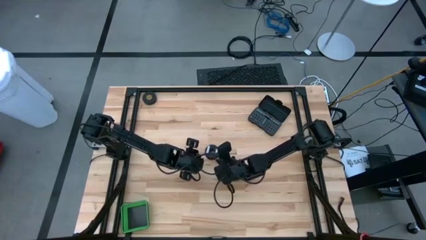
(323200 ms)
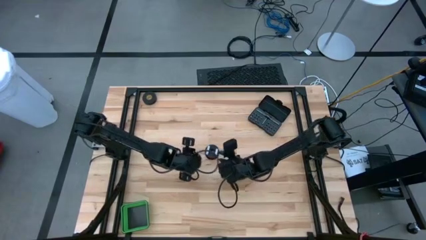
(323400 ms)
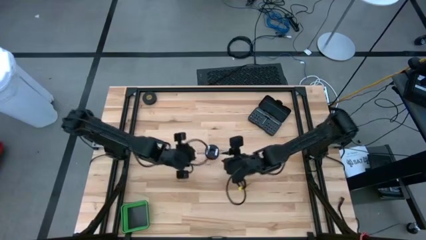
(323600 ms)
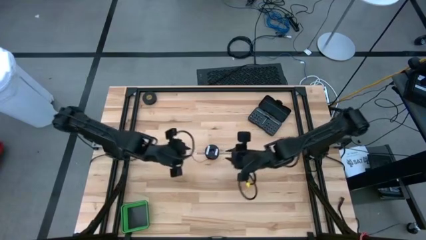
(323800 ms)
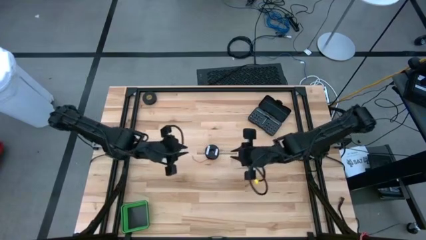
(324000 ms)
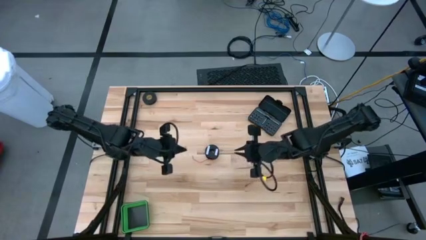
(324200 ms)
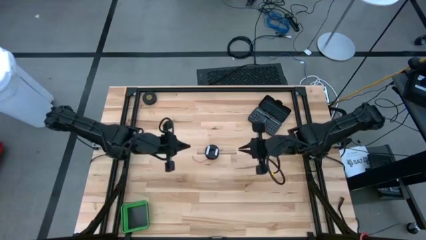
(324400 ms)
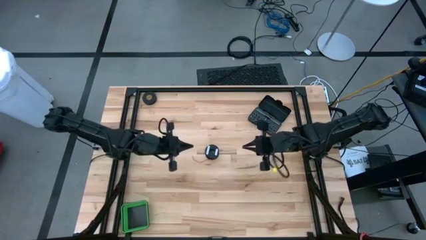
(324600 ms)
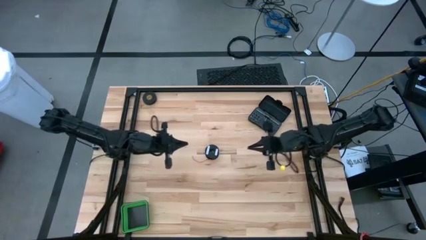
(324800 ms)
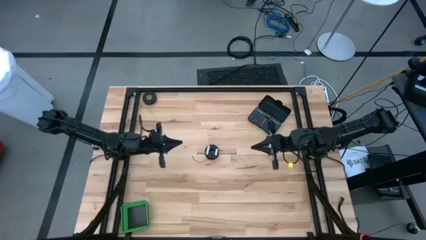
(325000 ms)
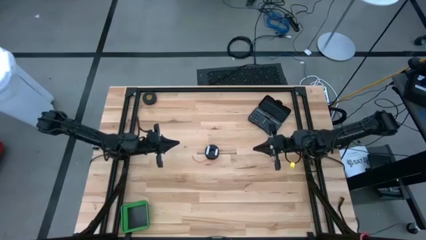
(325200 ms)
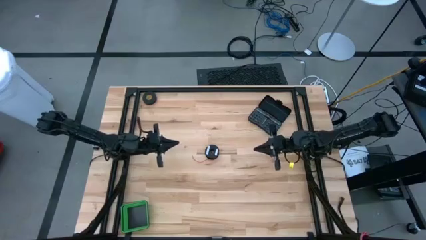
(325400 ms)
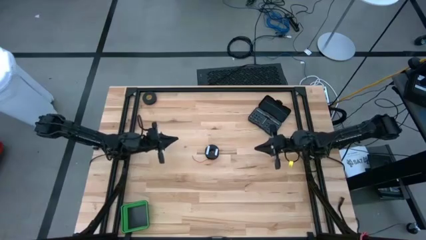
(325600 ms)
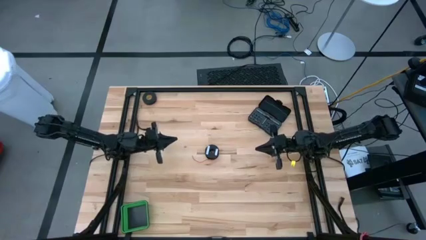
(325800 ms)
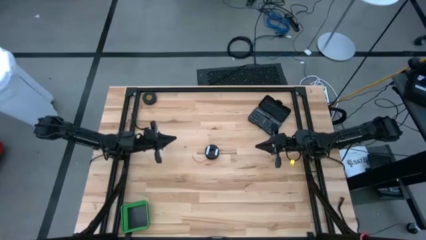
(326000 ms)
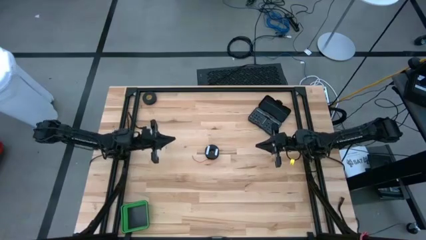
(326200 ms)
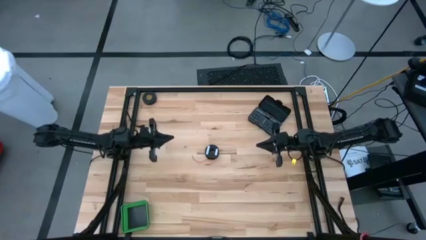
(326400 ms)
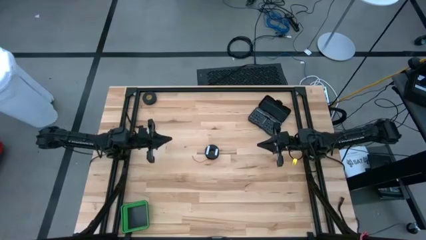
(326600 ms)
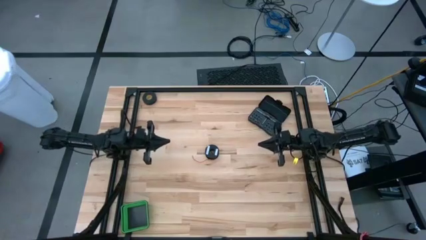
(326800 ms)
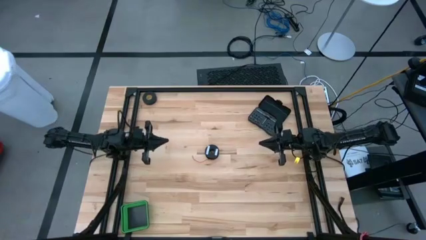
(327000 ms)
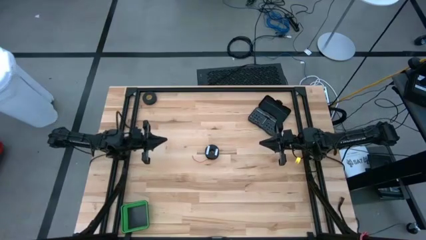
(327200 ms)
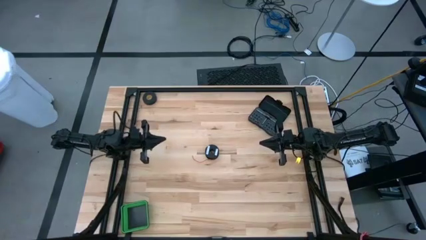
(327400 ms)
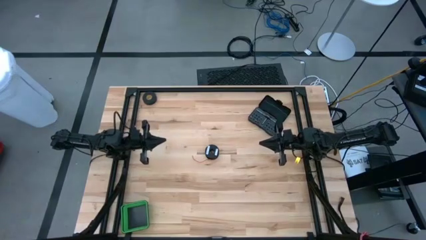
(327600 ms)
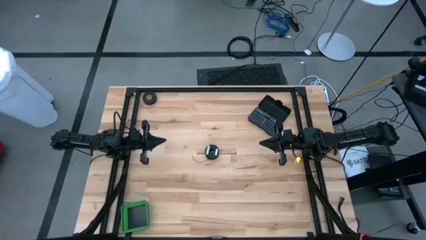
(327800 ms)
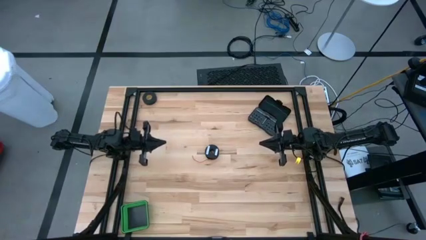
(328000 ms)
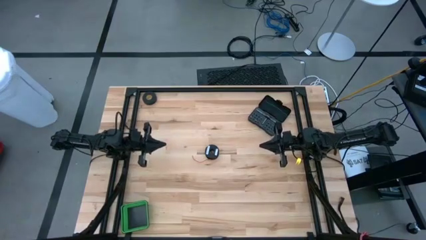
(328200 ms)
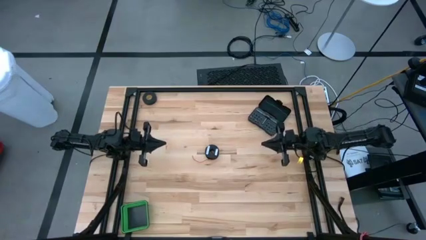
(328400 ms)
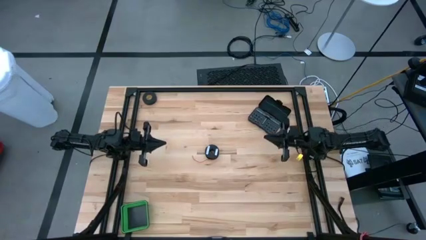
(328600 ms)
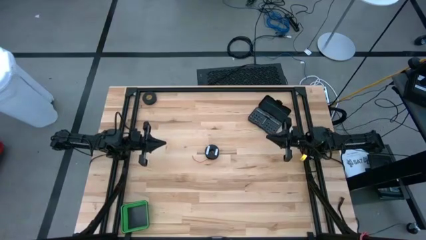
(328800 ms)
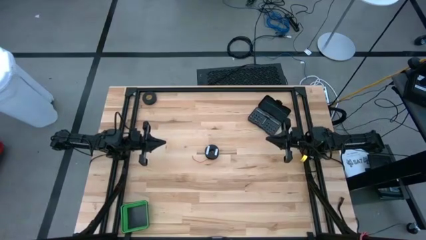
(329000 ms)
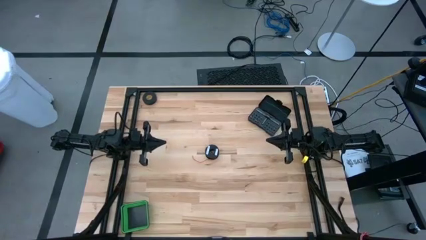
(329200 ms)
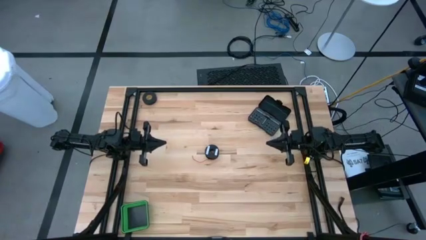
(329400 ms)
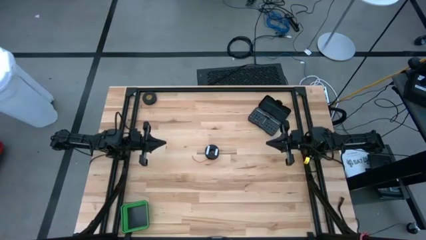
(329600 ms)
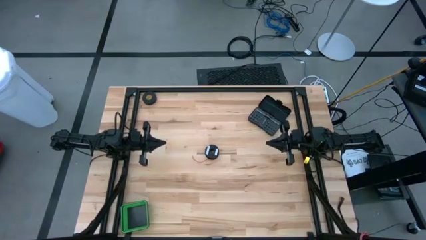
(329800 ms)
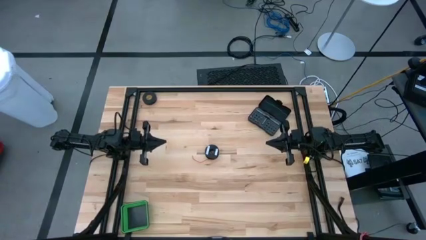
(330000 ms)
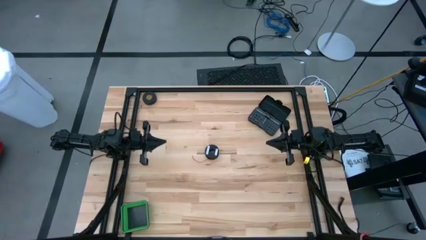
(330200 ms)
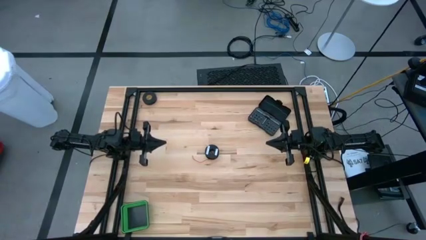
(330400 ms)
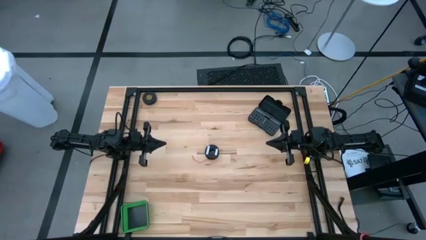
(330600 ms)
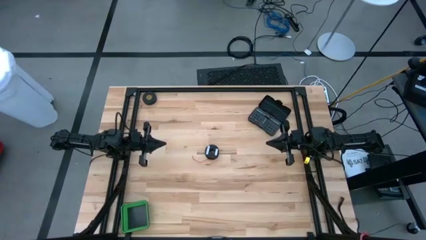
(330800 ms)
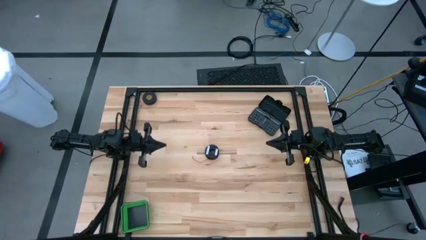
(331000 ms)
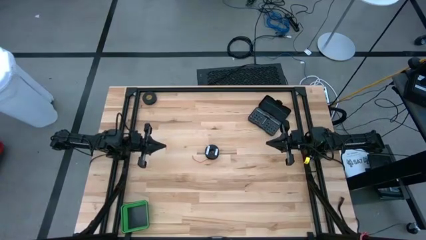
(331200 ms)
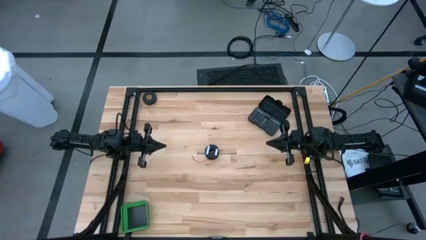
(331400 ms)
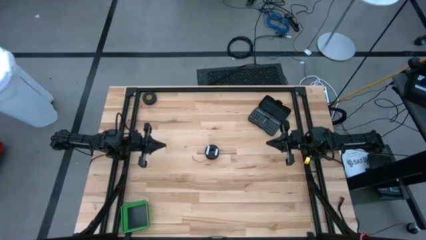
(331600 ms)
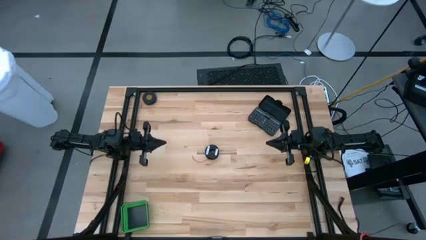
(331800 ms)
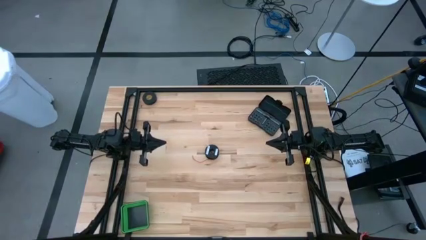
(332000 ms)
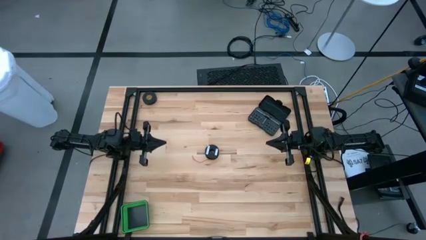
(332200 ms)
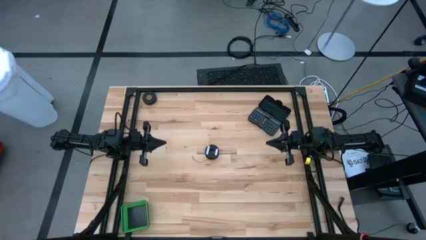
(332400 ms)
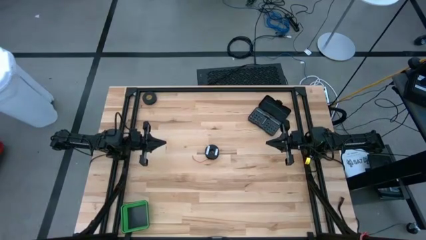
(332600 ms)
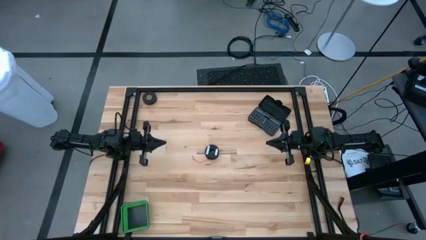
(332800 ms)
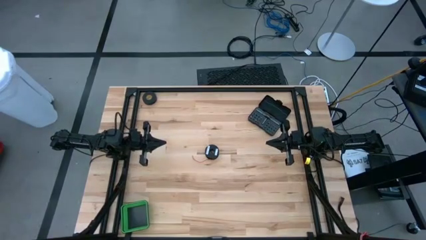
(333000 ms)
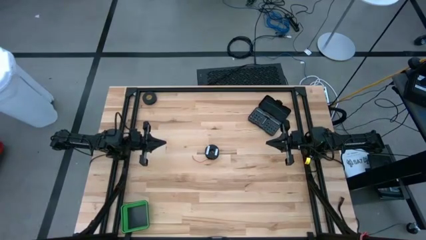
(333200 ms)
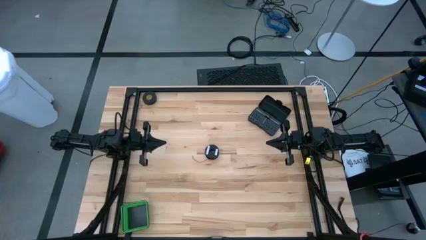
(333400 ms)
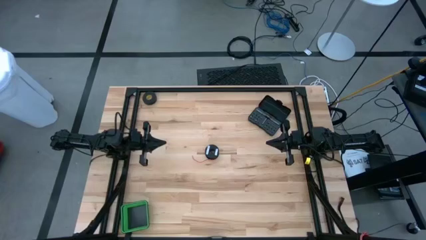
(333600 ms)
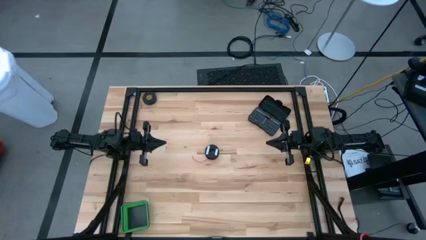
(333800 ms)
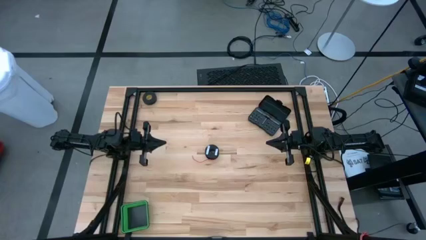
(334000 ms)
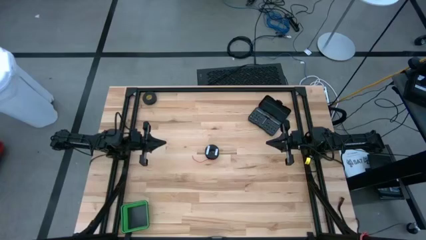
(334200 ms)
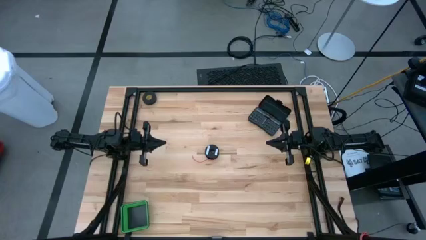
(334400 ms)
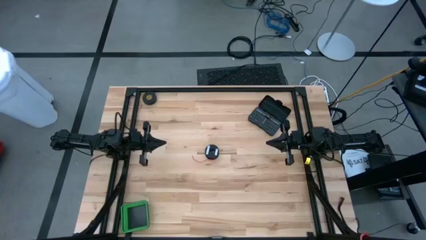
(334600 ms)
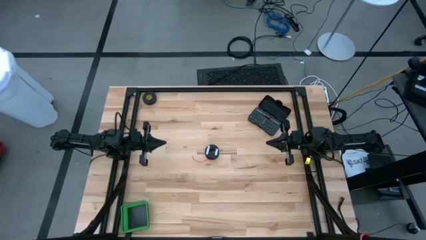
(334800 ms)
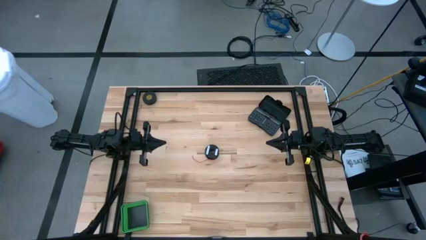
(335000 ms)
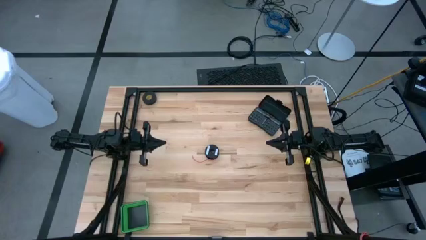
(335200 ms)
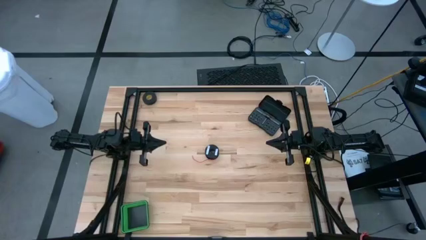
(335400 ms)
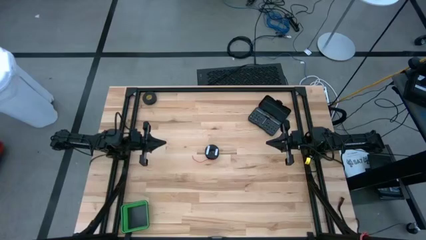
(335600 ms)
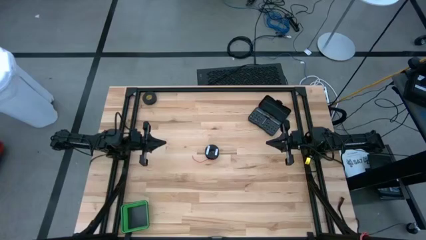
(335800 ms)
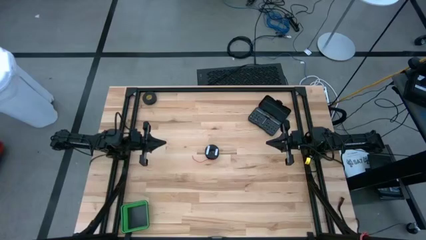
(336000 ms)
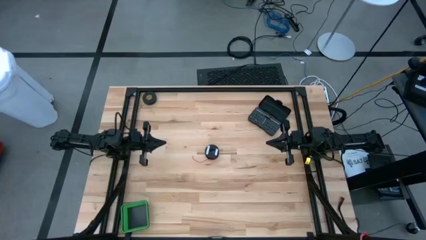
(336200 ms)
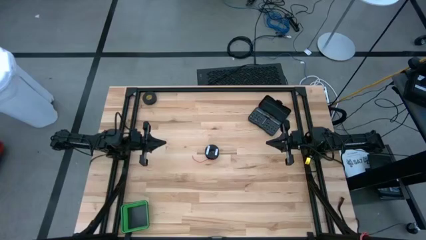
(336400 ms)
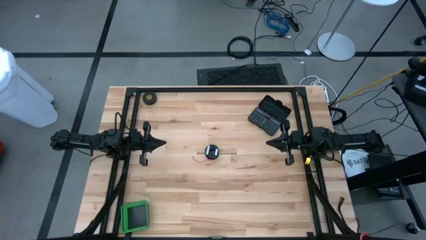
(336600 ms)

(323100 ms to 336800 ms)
Task: Coil cords
Return to Home Position

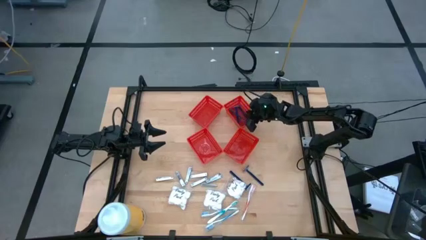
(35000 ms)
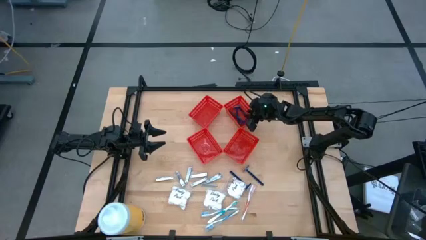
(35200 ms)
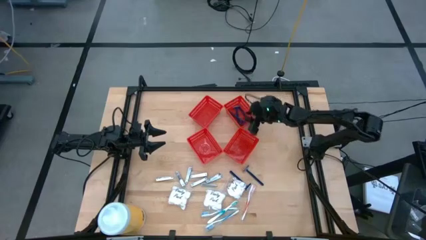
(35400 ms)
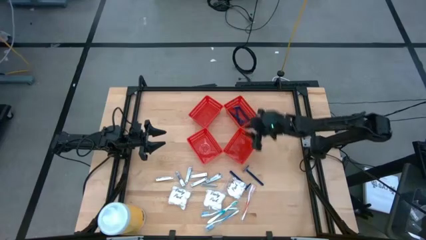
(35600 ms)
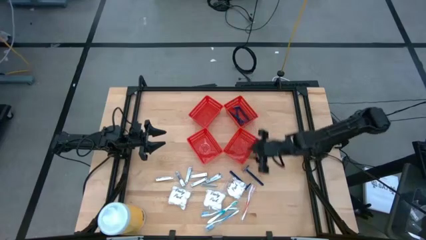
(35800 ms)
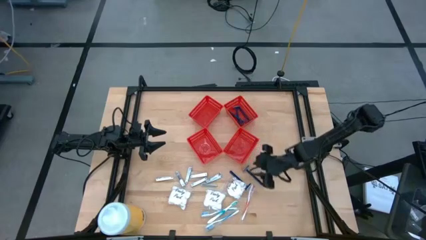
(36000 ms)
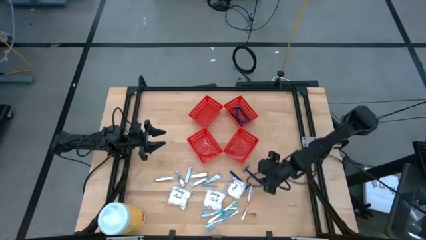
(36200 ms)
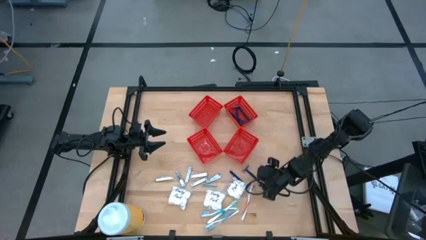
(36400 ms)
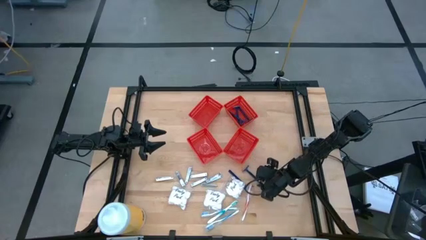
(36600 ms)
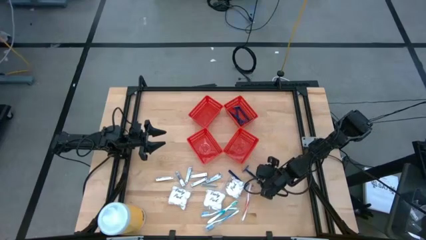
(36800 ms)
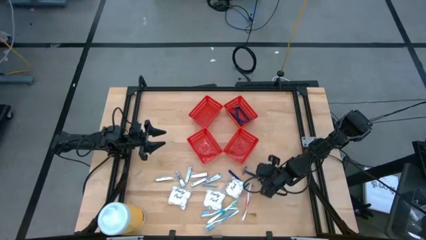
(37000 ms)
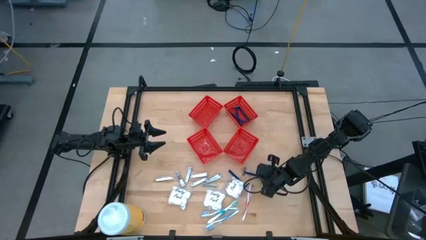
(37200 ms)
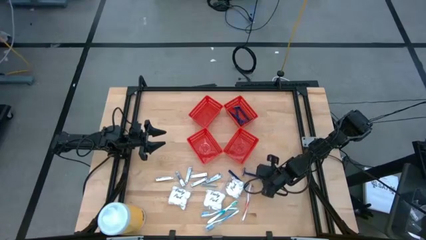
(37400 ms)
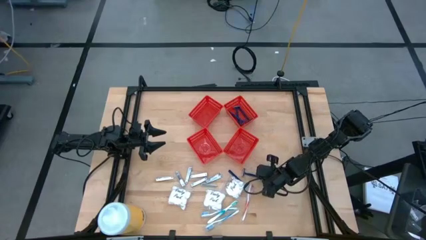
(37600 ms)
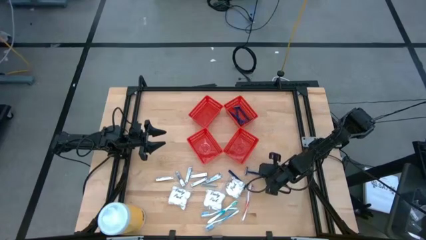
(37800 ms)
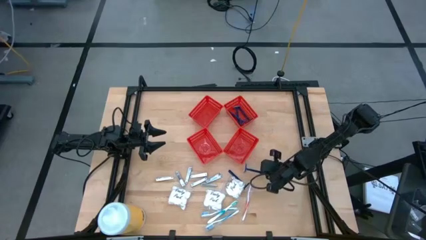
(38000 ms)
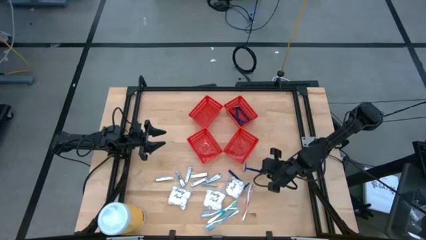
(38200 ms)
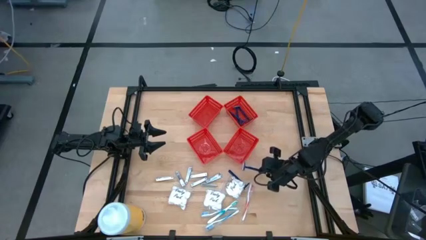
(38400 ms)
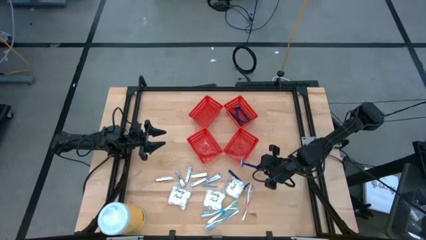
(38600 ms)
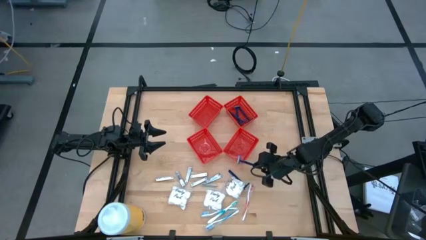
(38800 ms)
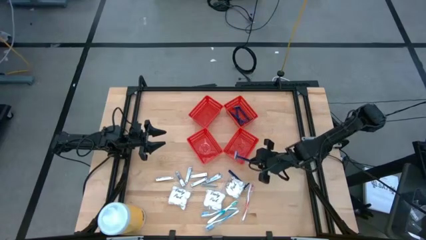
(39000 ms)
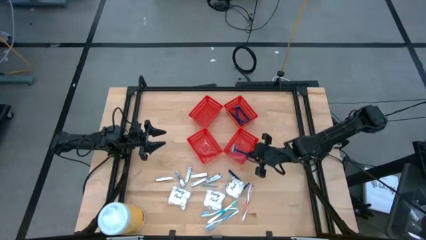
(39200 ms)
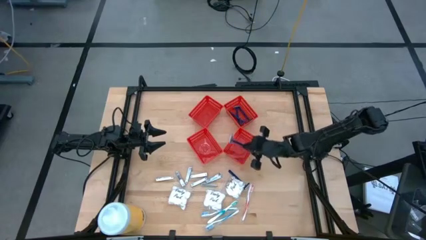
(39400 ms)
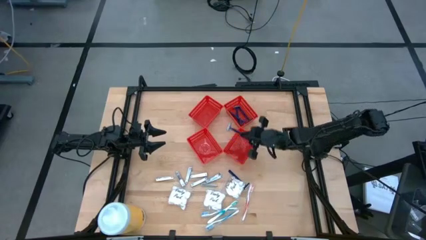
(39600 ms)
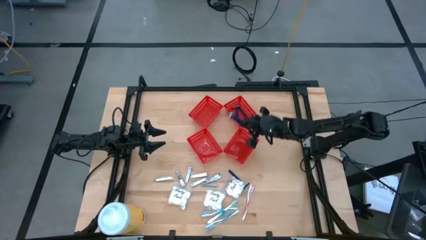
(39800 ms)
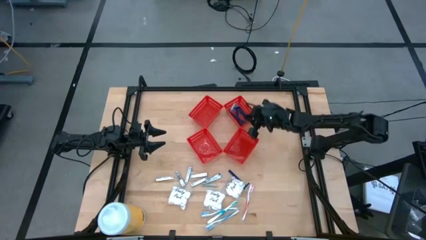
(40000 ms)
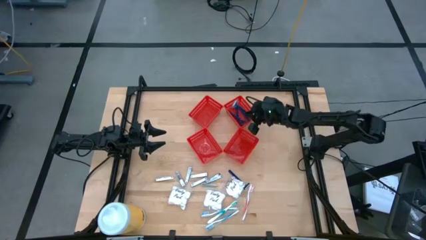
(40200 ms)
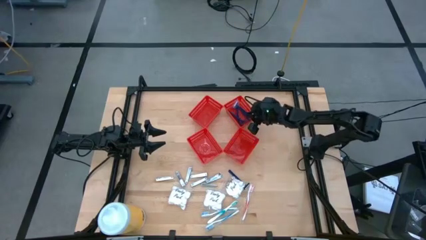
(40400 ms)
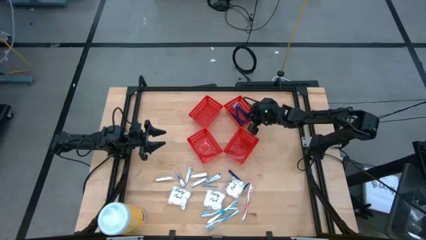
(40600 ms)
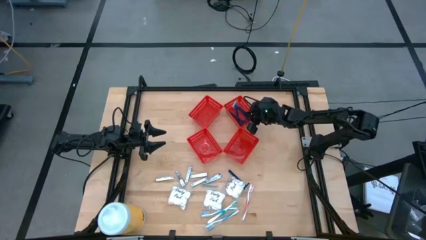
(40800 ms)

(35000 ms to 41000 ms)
Task: Pick & Place Travel size toiletries
Put the blue razor into the top right red bin
